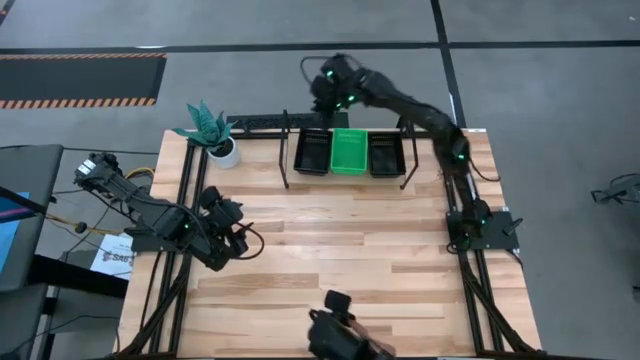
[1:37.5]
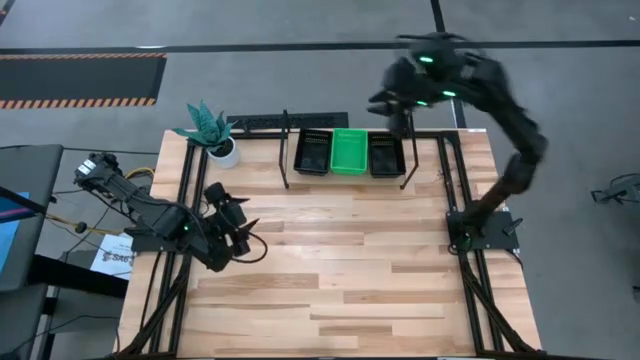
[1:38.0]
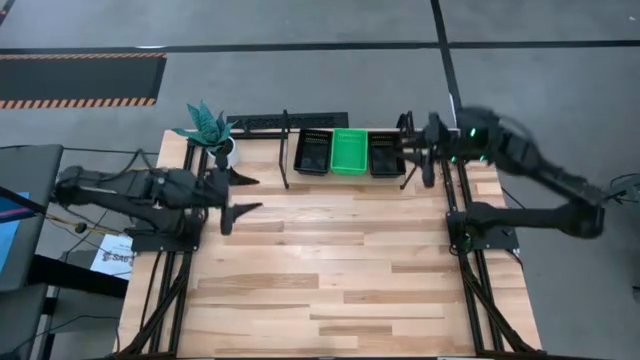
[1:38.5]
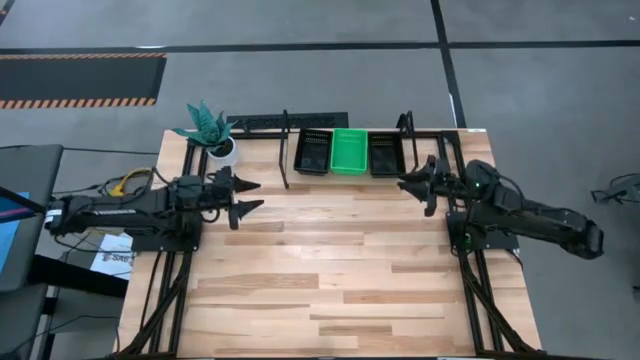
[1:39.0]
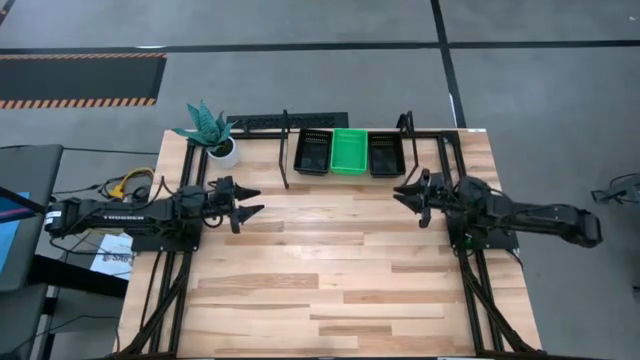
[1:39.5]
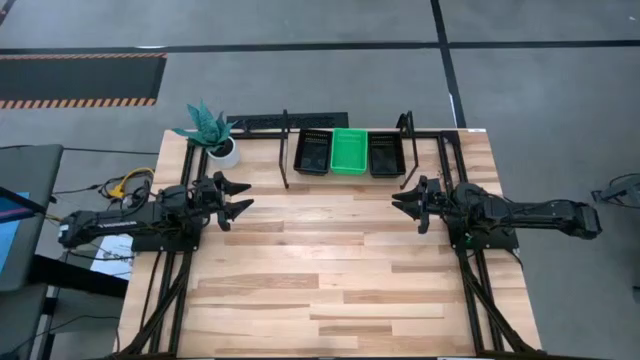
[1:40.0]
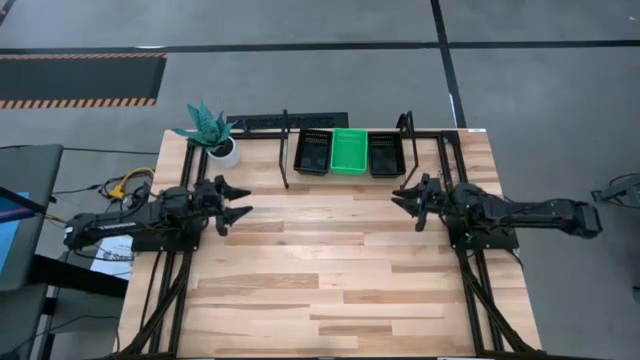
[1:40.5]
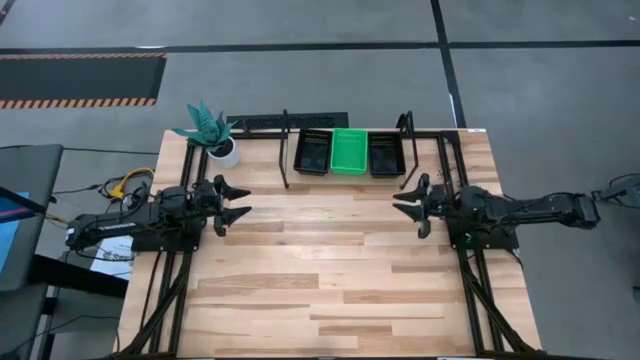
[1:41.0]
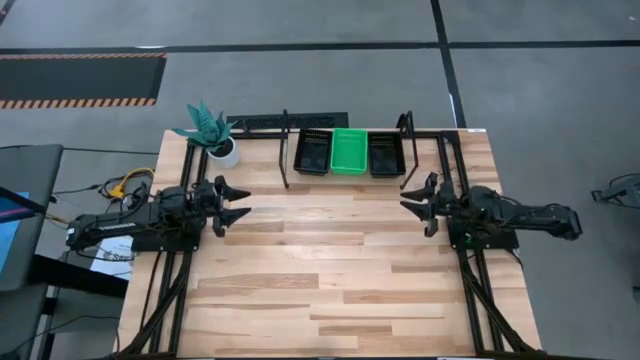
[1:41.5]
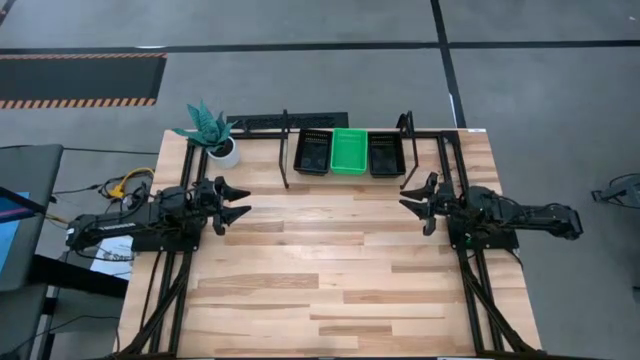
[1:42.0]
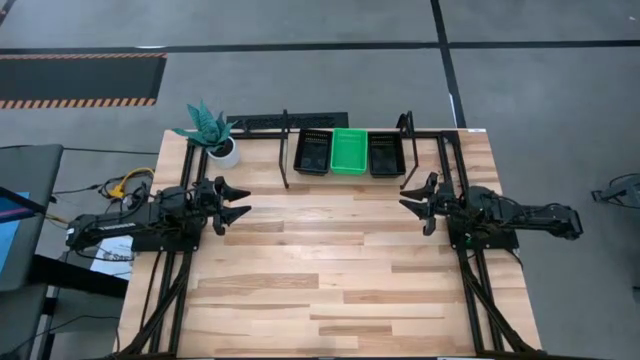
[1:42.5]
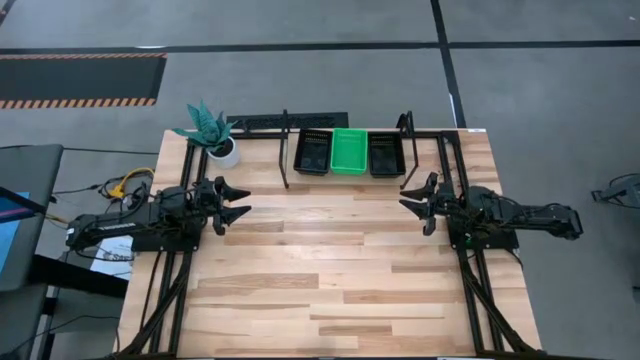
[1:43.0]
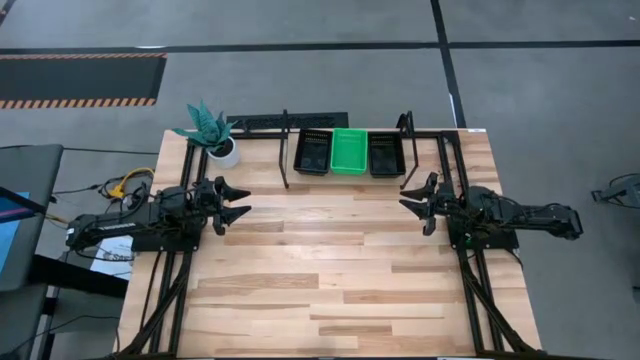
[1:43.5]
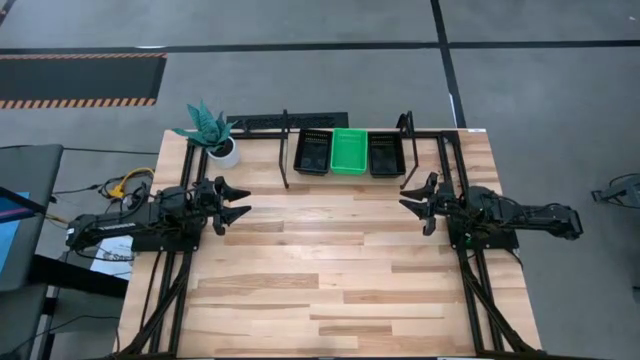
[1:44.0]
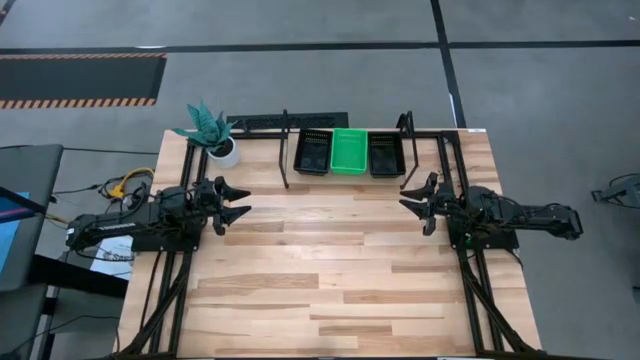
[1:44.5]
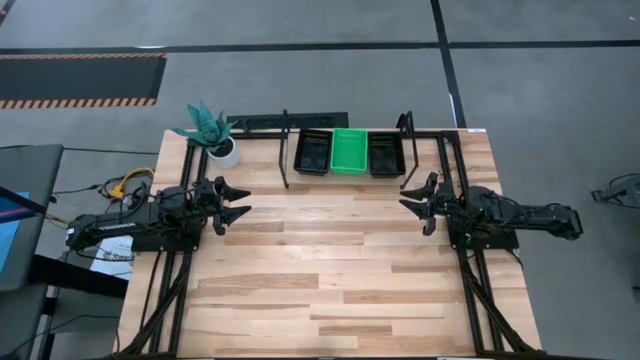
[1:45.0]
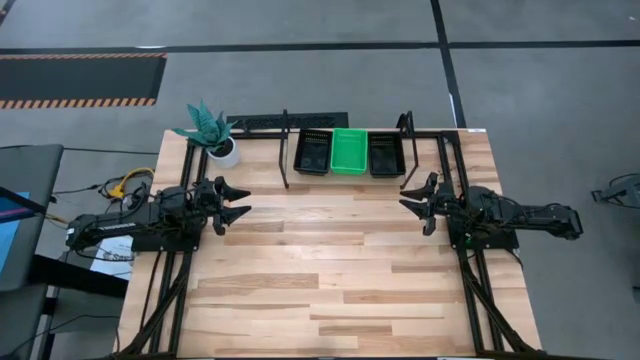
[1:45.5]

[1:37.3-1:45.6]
Task: Stack baskets on shelf by color
Return to Home Position

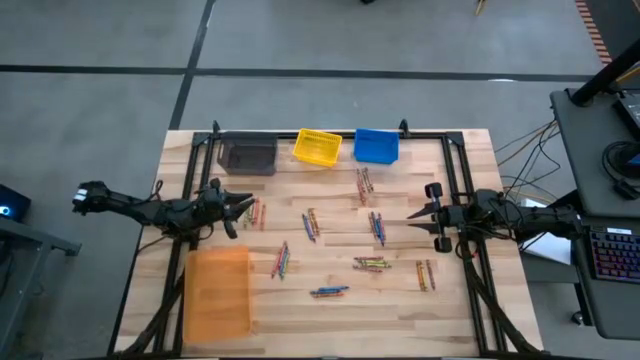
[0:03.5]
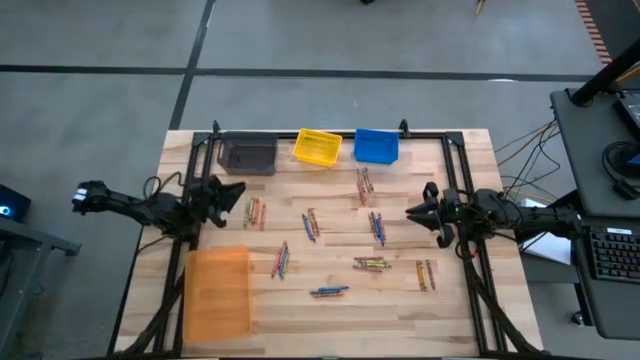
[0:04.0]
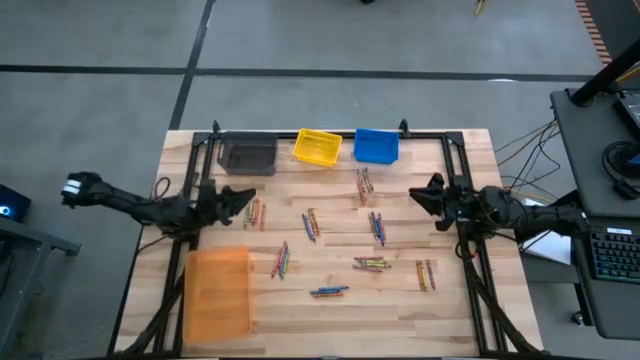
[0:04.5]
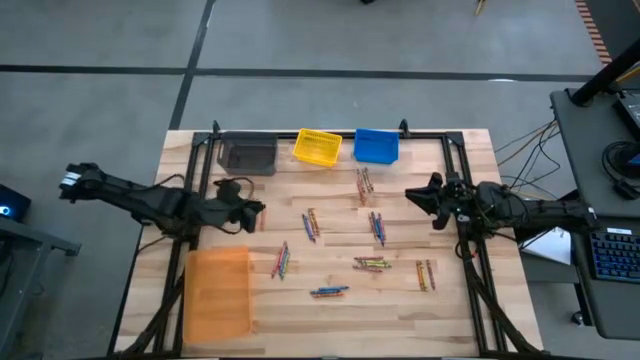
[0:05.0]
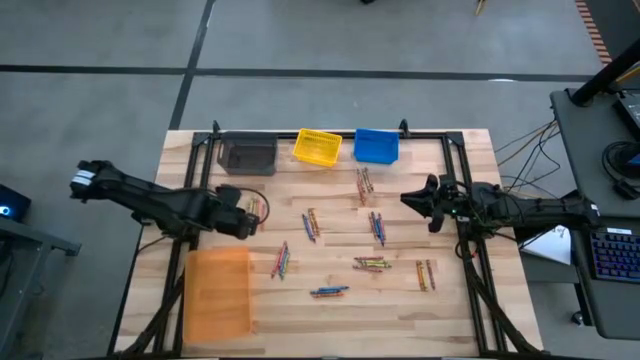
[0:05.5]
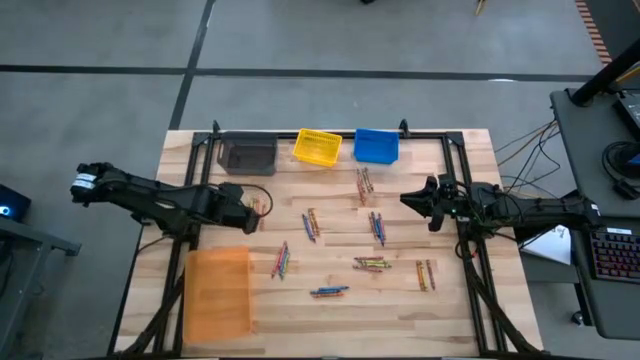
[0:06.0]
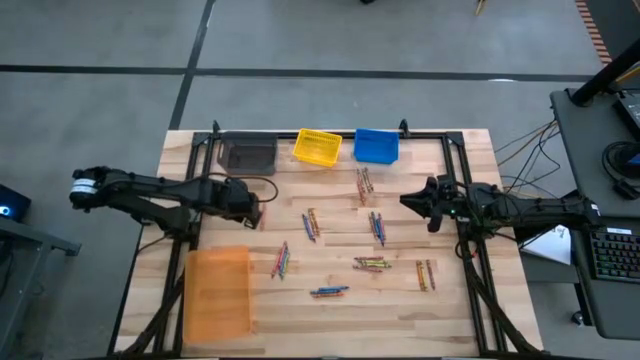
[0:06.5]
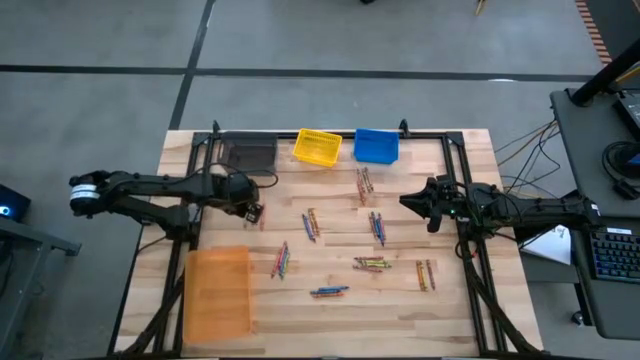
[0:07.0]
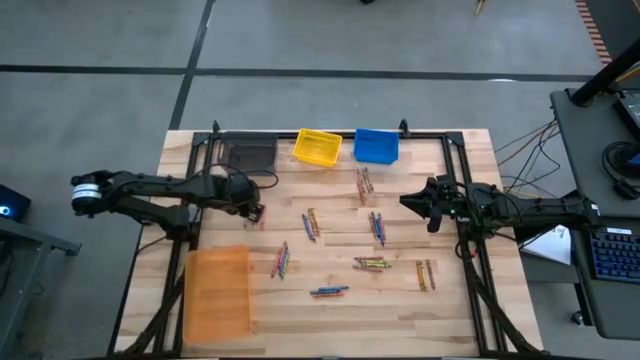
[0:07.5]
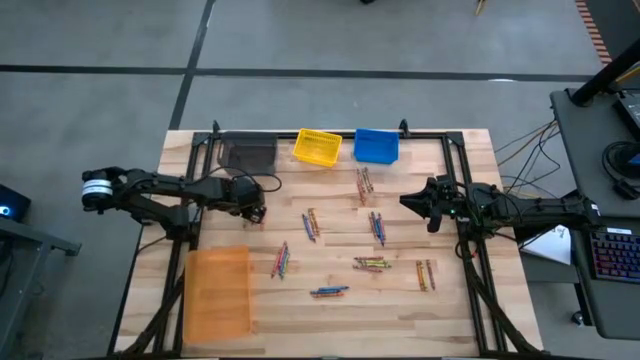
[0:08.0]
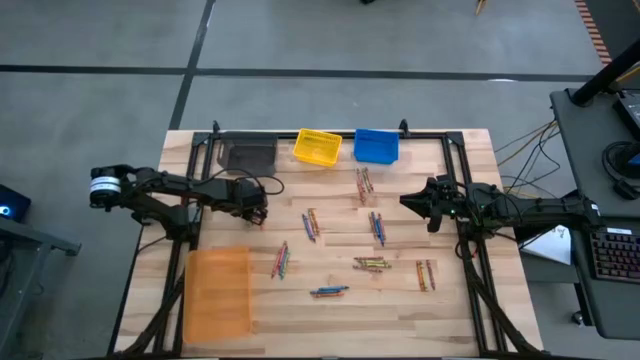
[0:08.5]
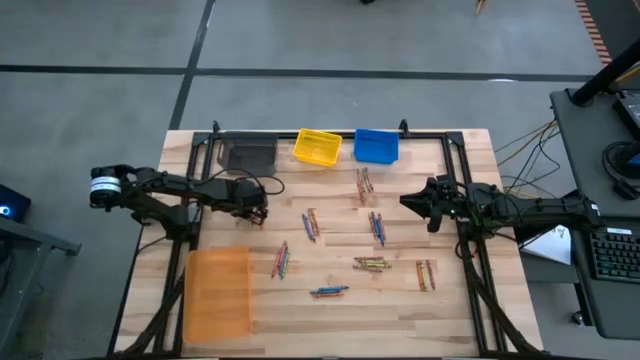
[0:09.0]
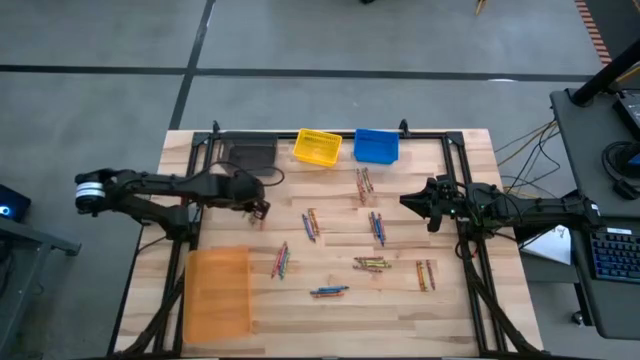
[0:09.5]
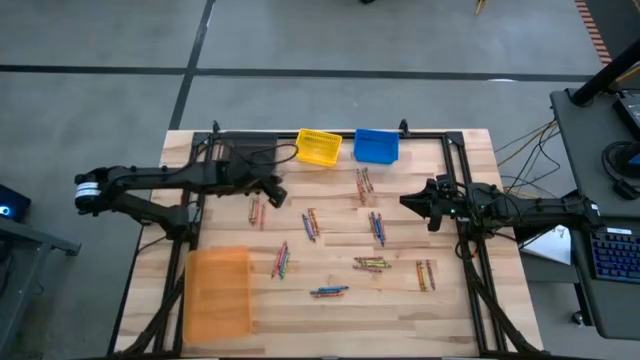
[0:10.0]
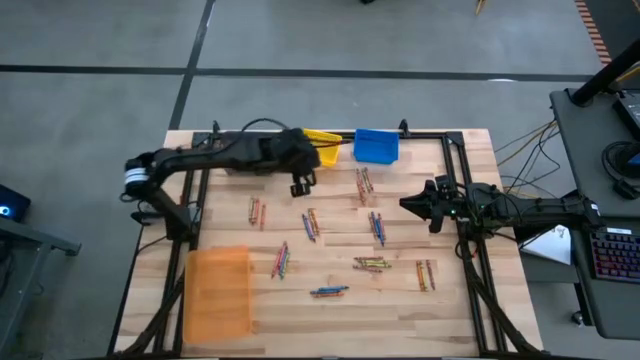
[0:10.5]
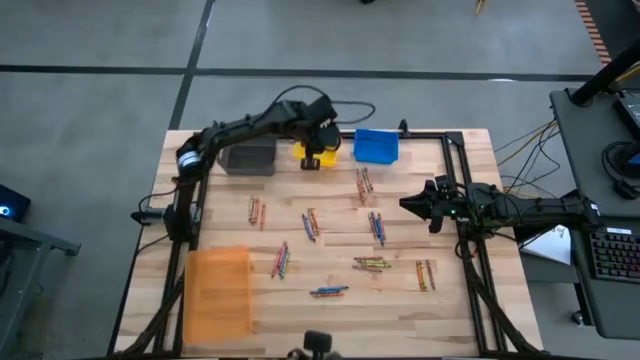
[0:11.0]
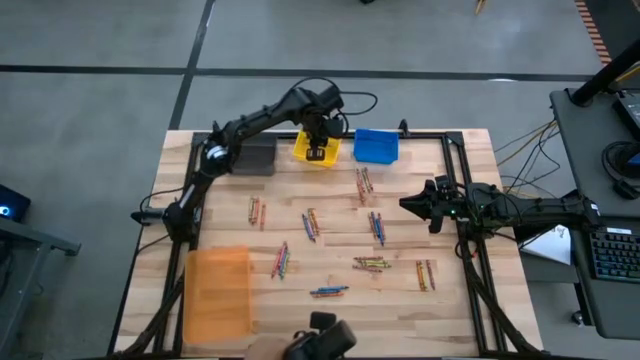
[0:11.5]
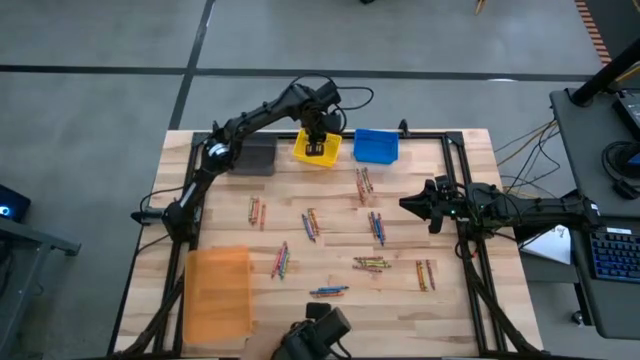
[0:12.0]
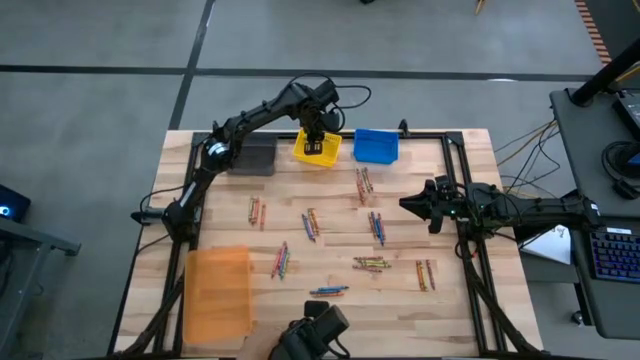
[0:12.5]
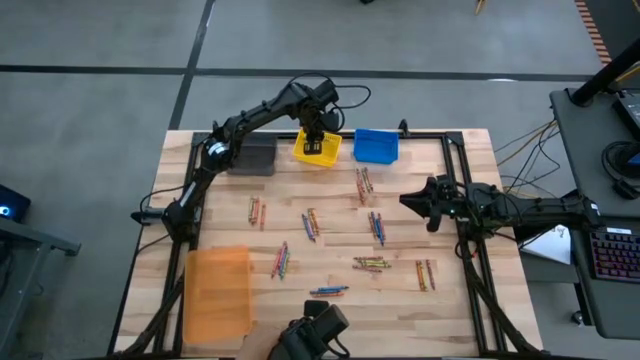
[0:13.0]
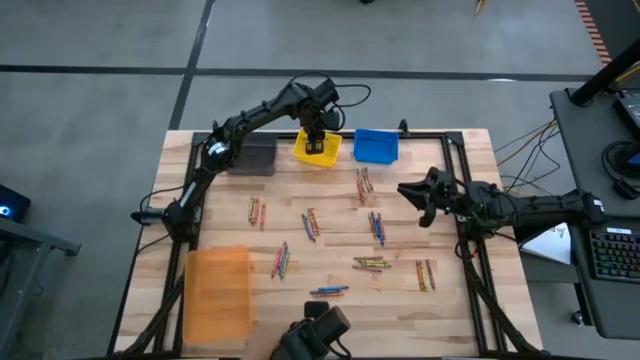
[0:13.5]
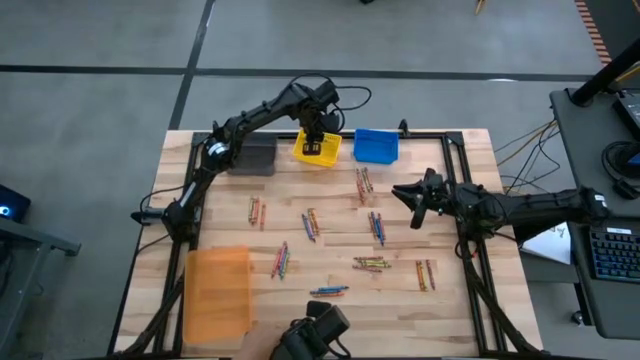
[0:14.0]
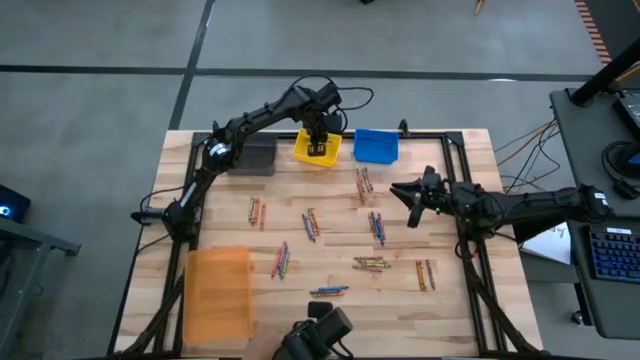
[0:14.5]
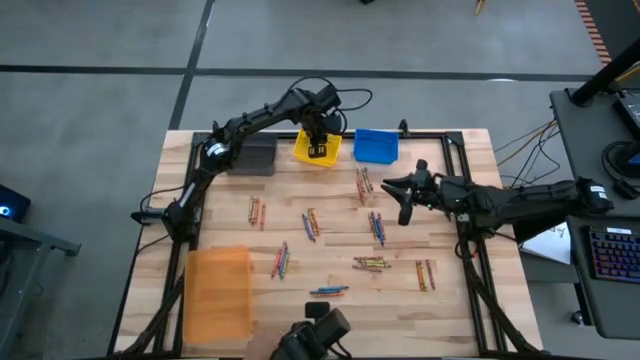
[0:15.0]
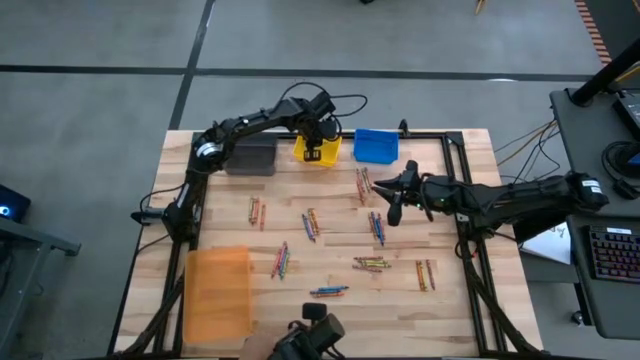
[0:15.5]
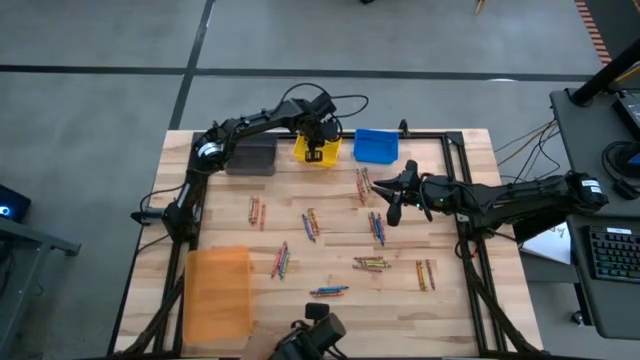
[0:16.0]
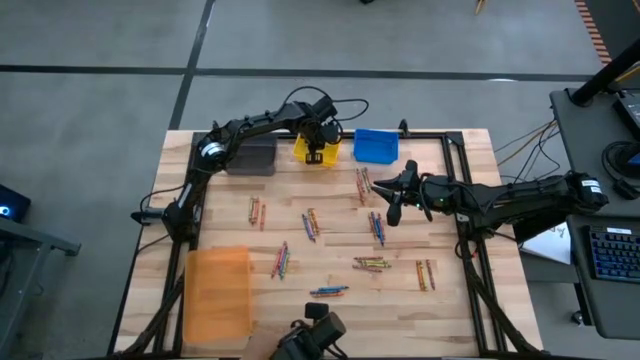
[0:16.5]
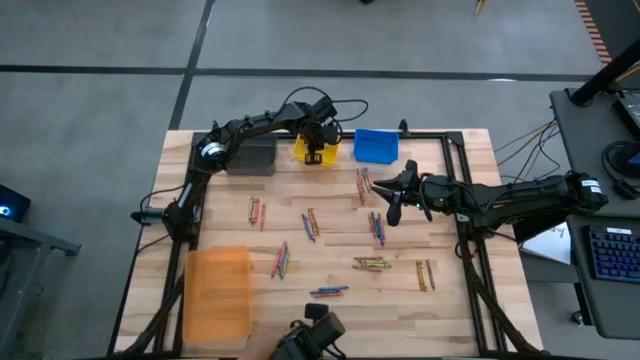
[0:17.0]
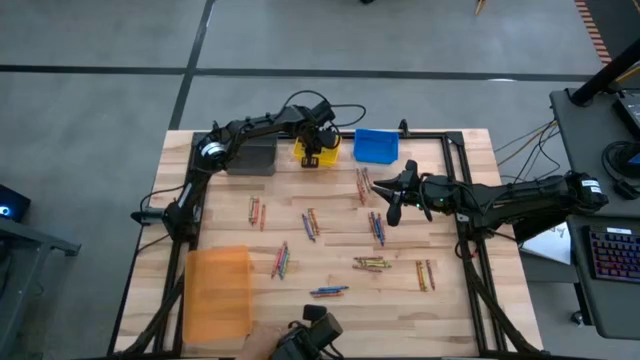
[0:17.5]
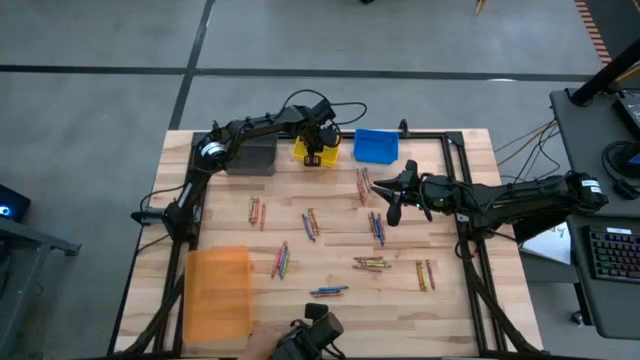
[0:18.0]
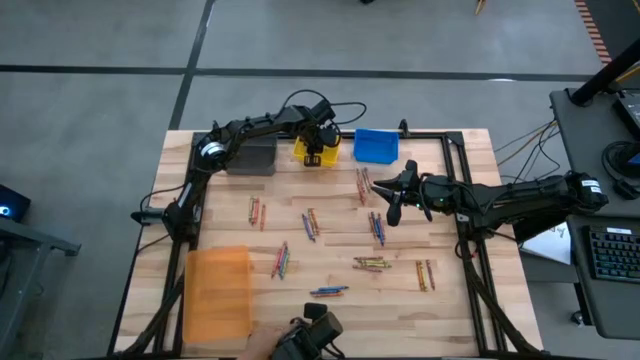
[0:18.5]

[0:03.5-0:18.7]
Task: Sort crayons
Put the green crayon into the yellow bin
